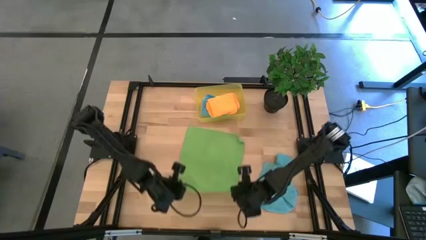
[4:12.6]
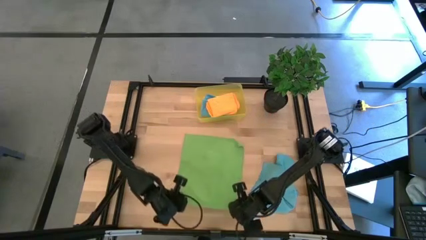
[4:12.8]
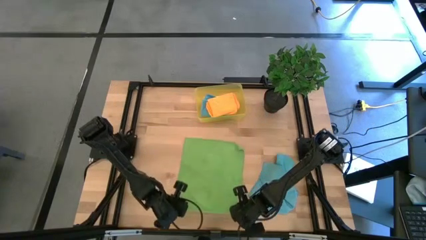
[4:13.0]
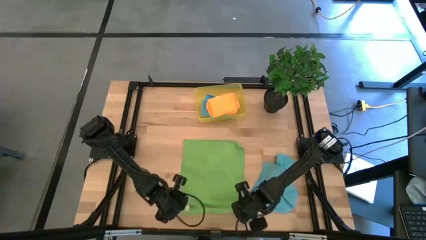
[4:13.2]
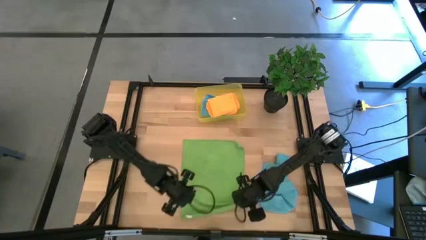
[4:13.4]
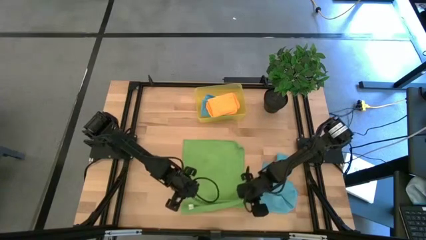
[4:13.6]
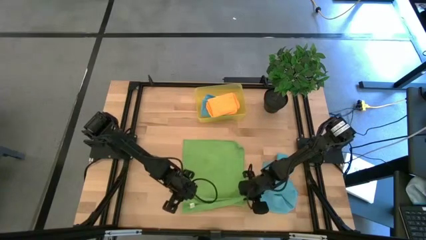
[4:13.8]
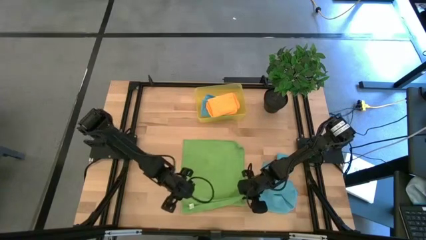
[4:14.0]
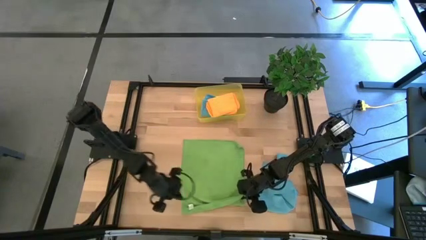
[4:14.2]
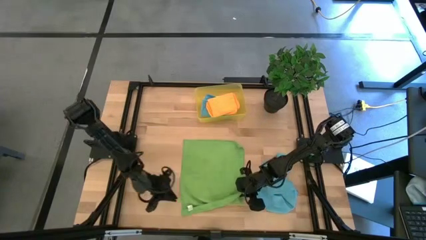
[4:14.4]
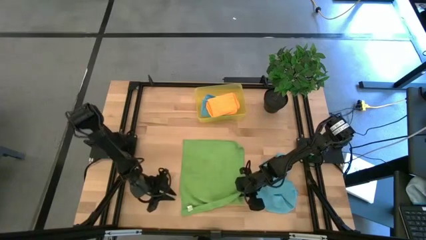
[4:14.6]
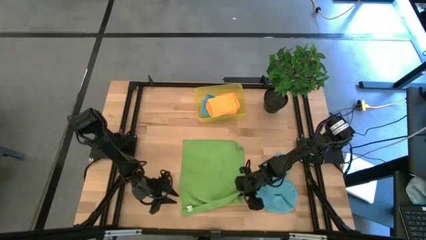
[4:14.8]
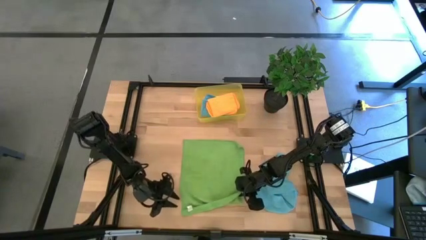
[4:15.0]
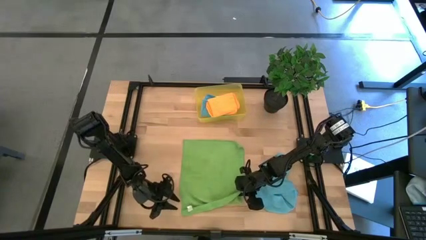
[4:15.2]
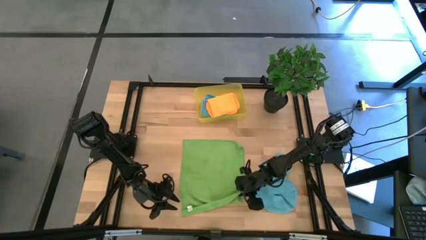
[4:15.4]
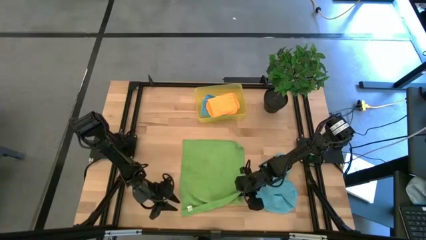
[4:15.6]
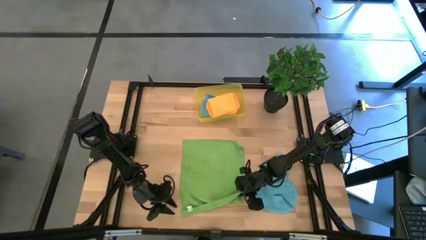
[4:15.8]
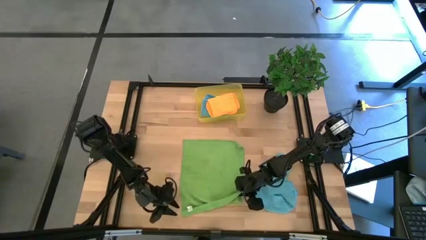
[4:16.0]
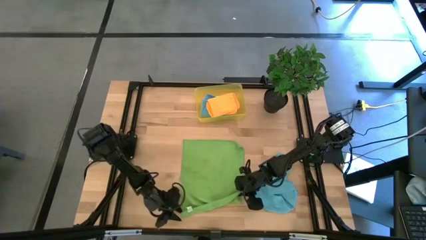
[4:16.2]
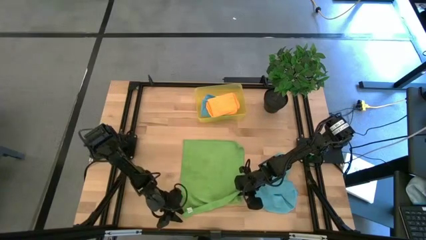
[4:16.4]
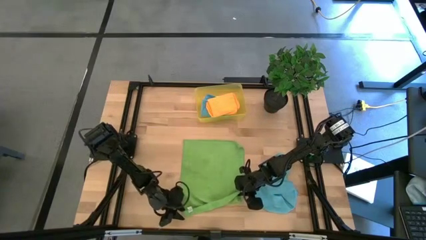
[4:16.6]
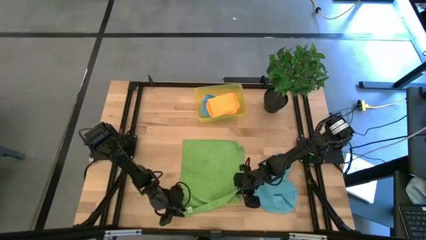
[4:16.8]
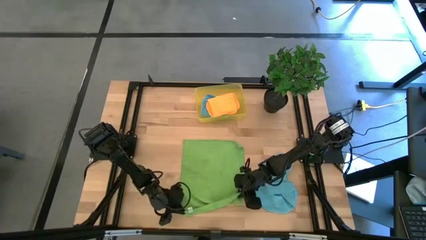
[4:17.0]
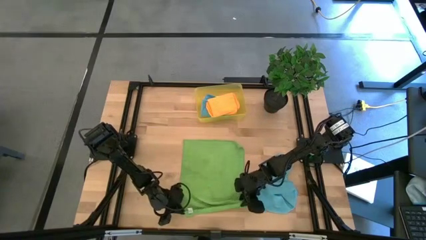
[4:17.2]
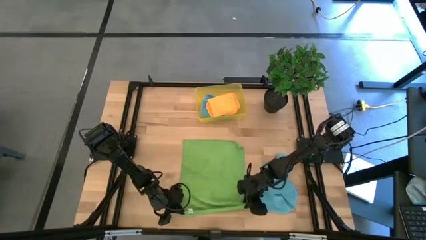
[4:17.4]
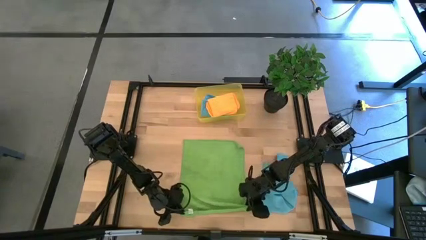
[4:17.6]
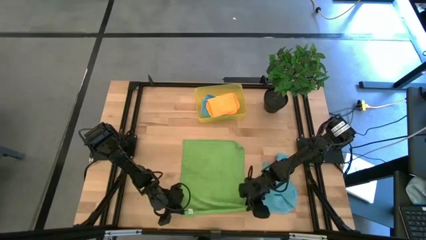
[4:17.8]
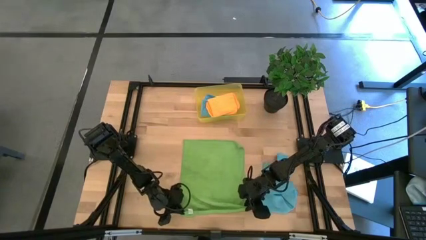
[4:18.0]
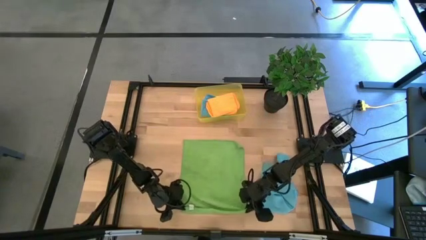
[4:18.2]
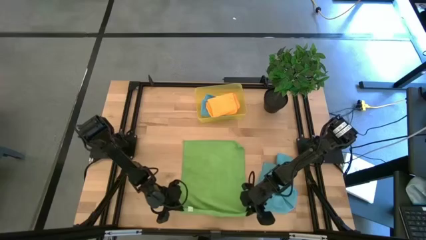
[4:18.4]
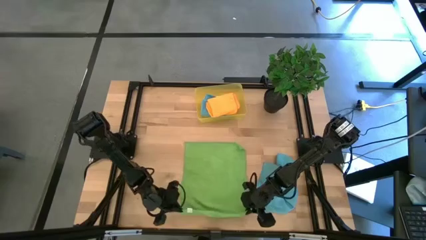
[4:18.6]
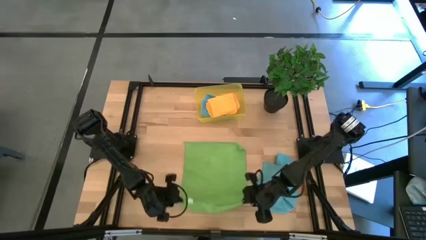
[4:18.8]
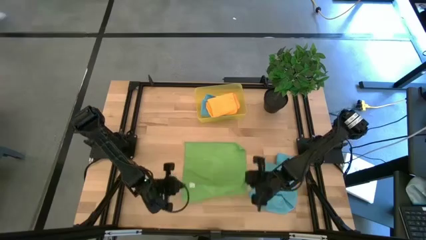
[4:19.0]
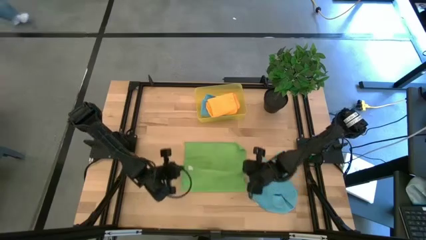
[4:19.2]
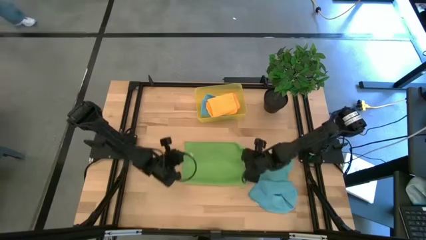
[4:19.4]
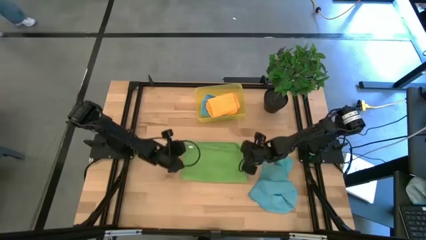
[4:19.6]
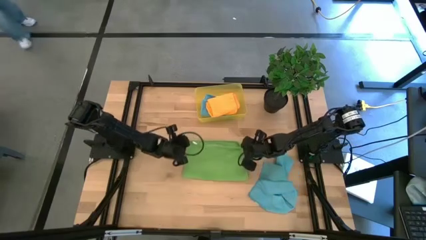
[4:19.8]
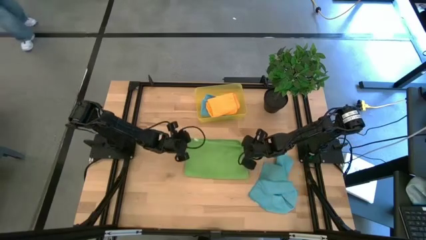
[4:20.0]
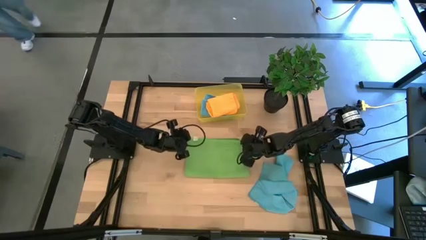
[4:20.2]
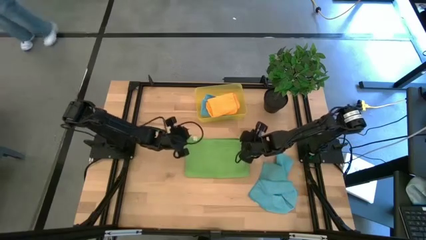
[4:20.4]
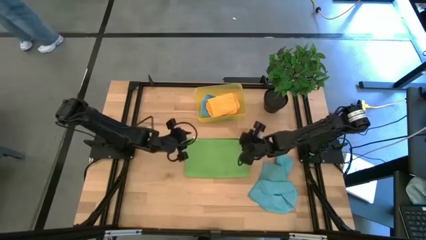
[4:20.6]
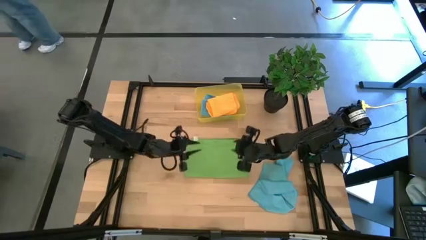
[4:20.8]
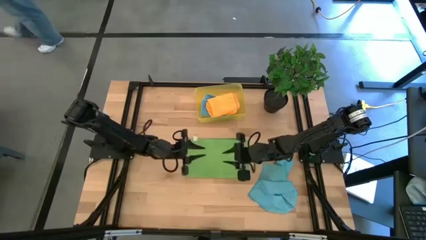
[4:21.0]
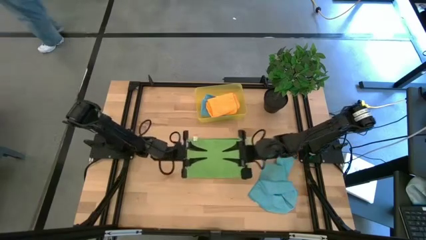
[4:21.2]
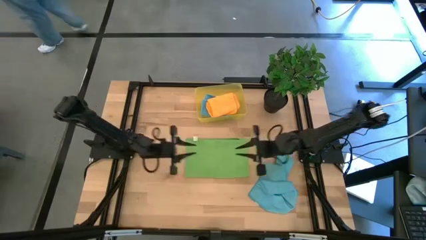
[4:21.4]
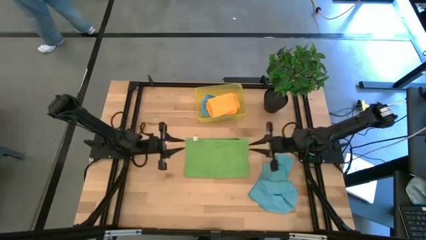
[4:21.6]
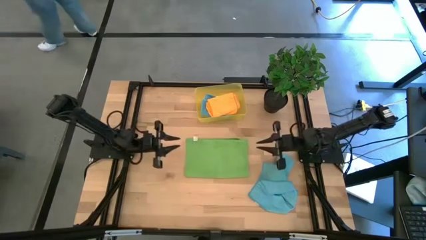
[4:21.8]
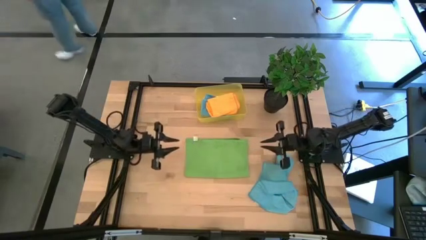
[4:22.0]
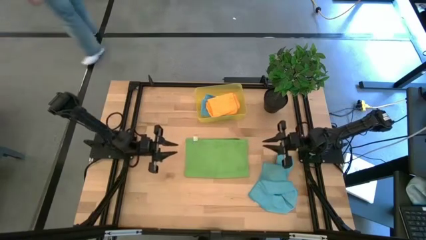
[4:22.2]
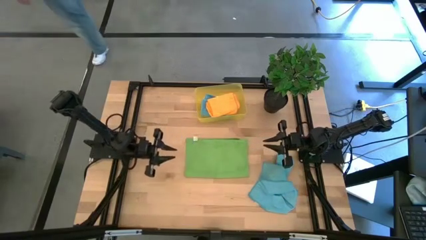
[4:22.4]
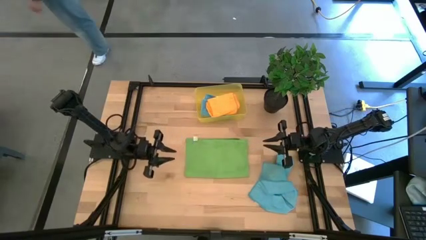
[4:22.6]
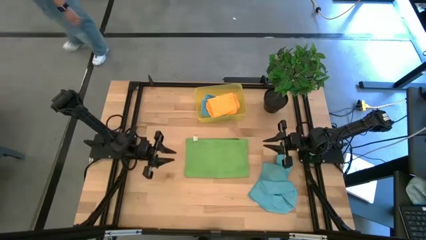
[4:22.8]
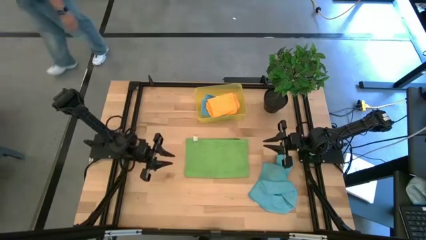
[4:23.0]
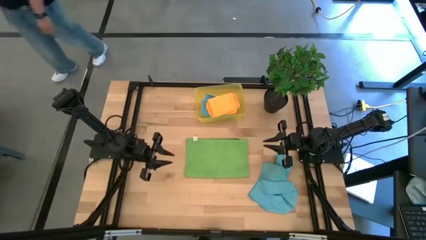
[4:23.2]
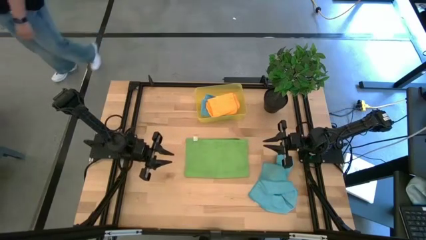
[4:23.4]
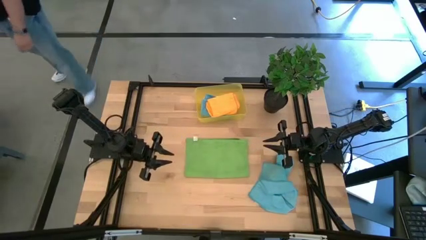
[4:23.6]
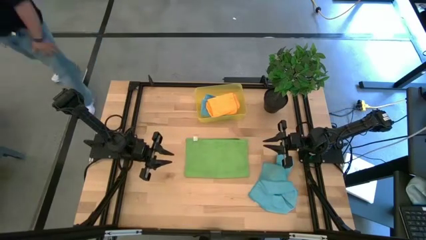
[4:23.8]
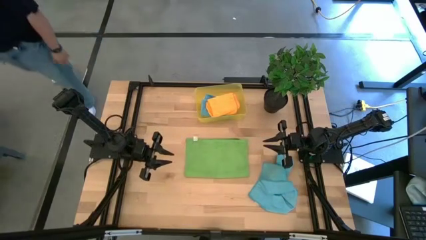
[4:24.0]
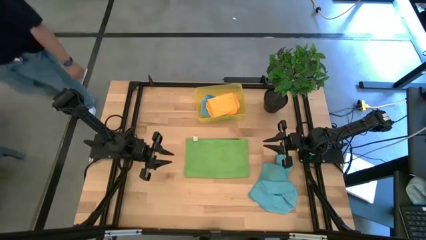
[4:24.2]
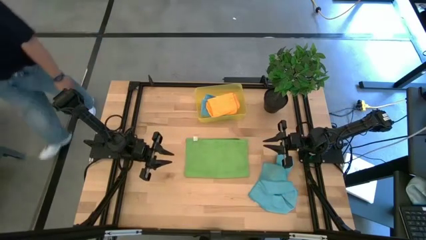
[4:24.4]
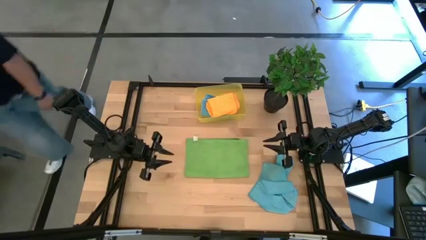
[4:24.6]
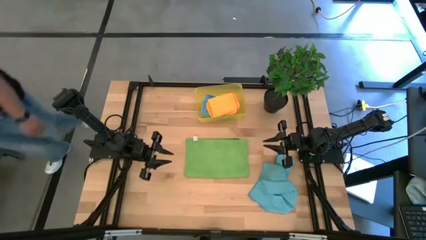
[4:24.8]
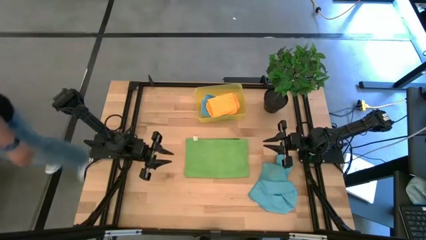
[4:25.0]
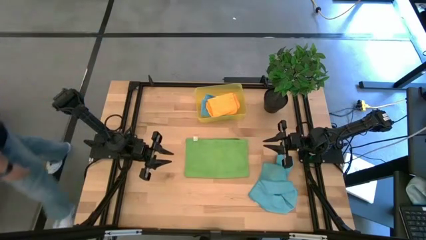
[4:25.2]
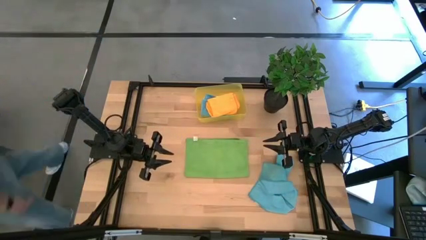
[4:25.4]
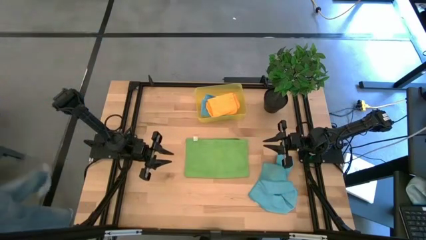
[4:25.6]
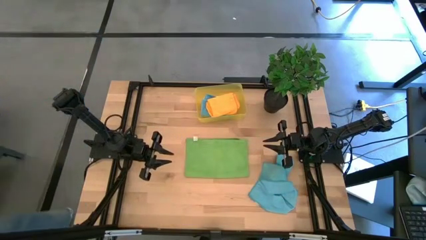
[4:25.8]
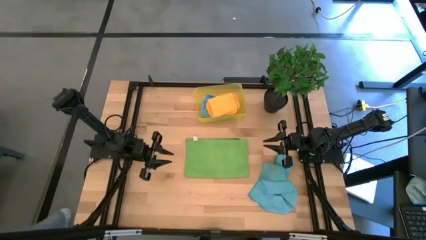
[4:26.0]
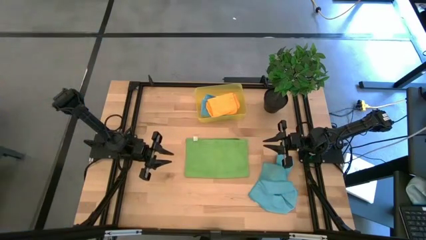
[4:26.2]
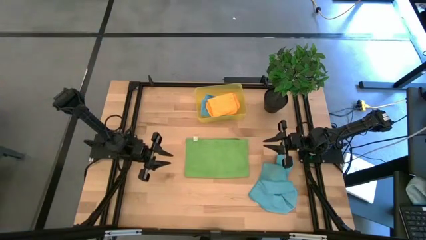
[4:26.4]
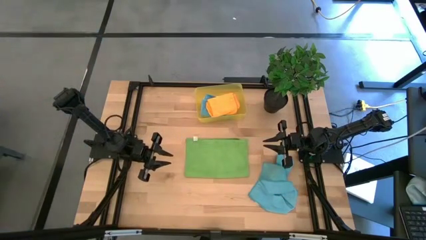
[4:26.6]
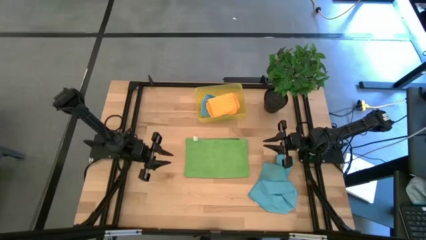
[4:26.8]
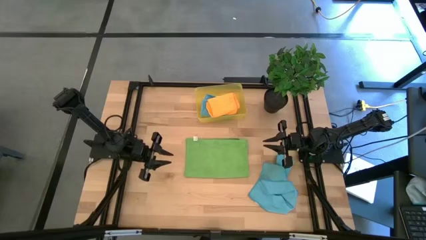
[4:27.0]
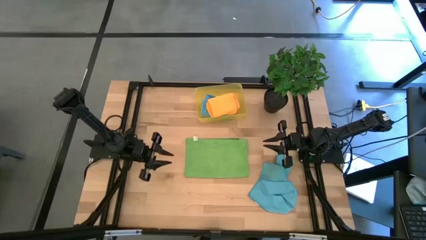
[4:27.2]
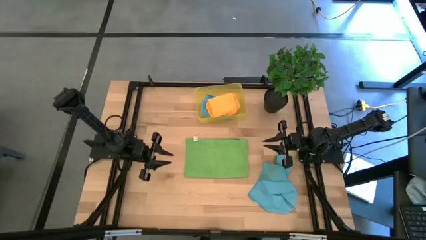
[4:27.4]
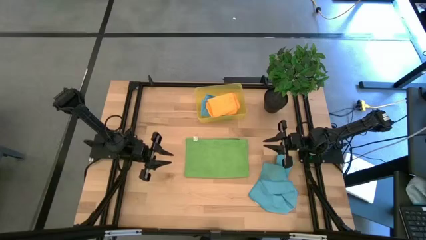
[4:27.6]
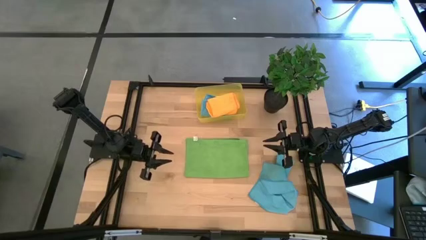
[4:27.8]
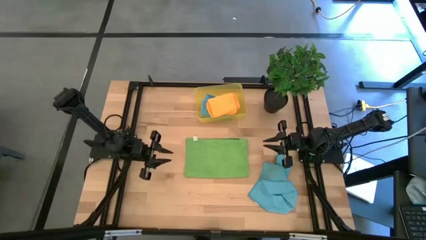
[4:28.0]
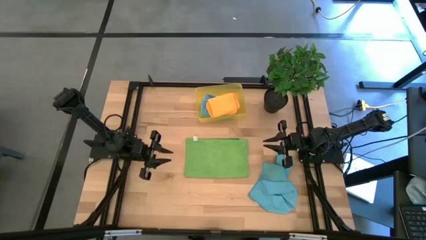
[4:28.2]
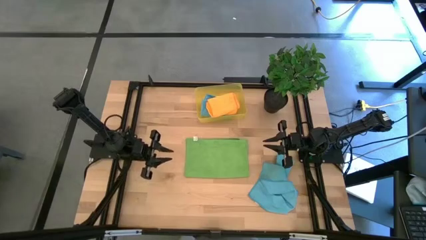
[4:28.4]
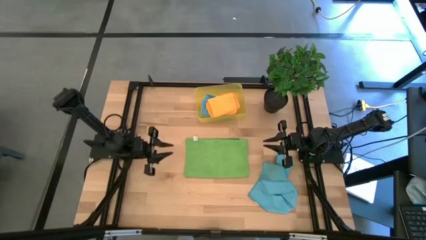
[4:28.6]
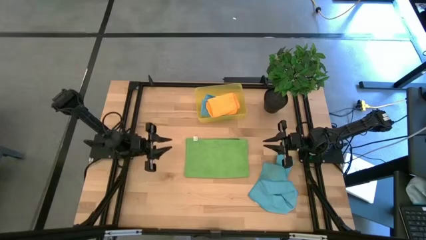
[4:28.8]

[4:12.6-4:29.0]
Task: Fold microfiber towels
Fold the green microfiber towel
